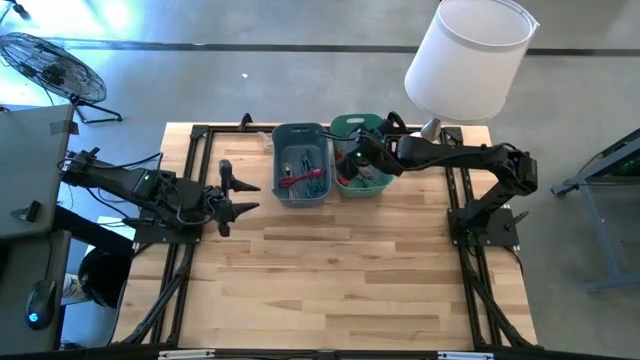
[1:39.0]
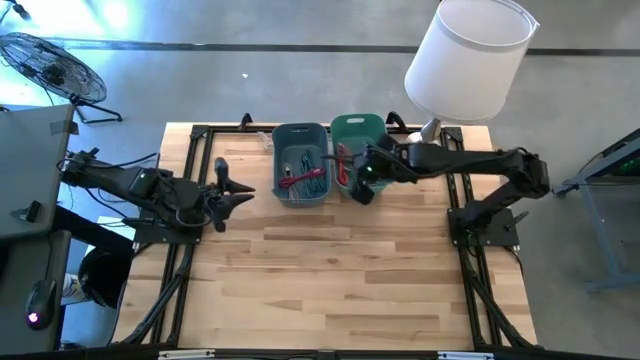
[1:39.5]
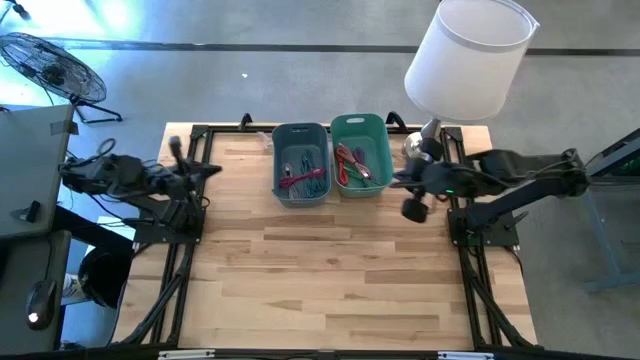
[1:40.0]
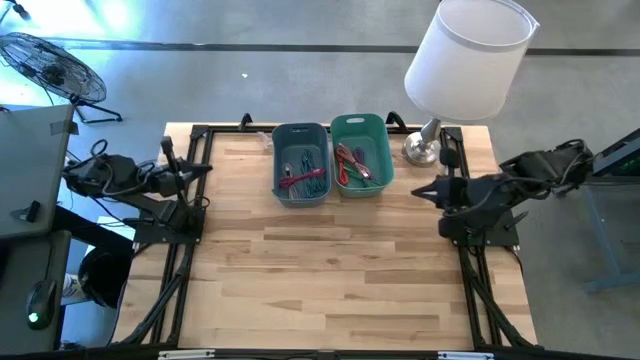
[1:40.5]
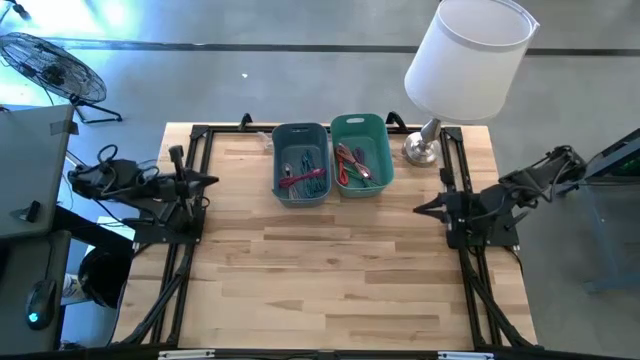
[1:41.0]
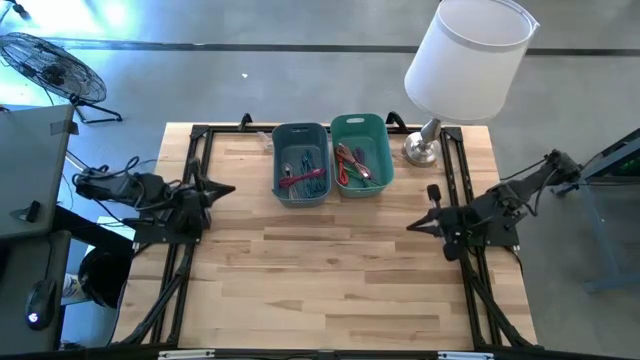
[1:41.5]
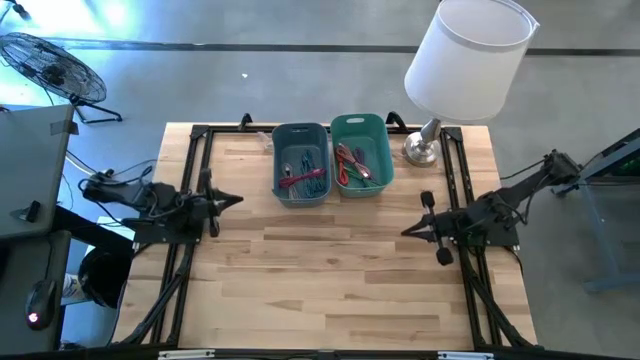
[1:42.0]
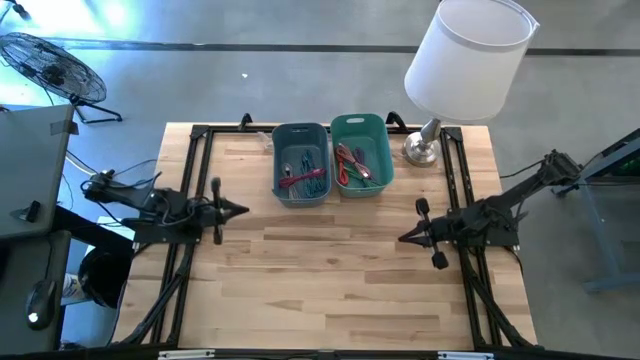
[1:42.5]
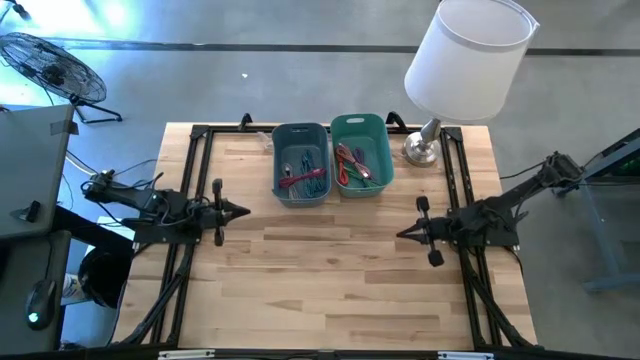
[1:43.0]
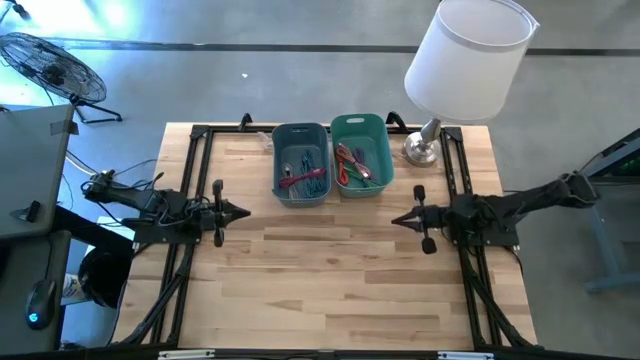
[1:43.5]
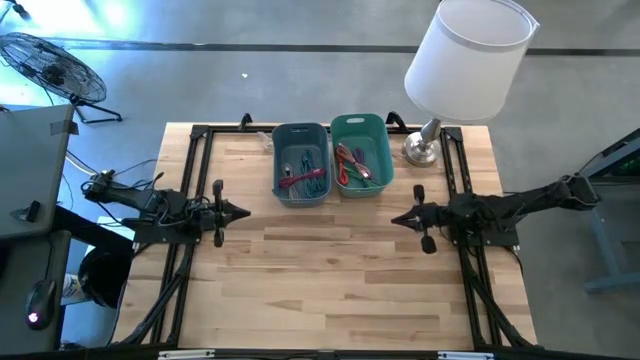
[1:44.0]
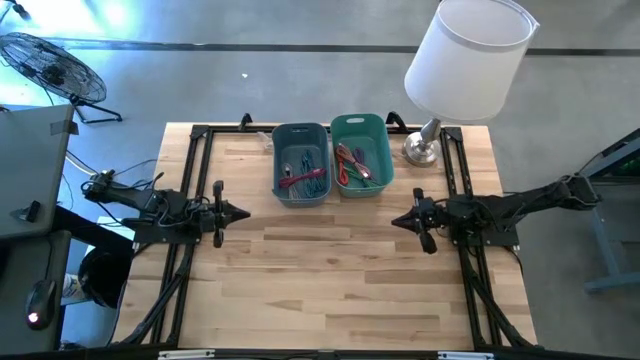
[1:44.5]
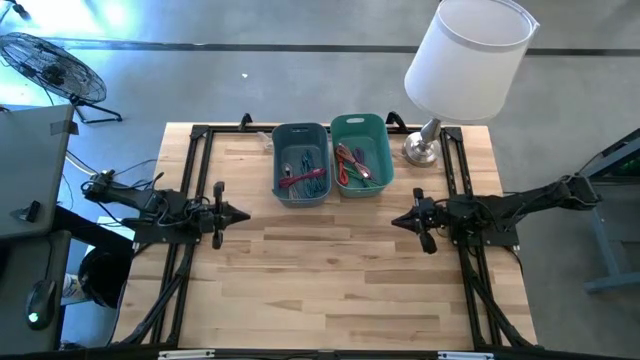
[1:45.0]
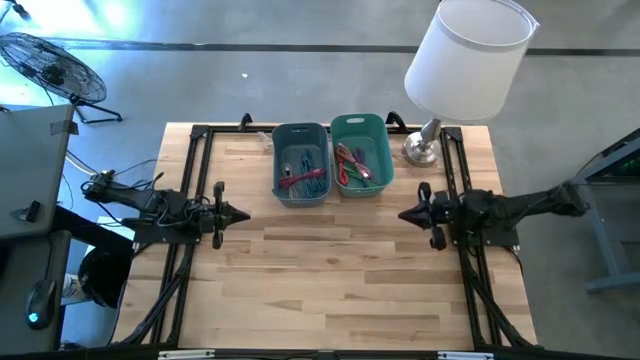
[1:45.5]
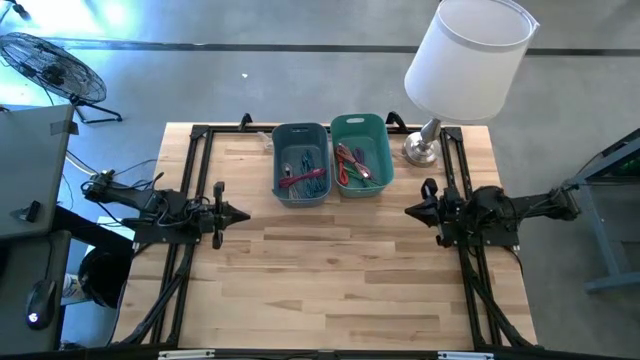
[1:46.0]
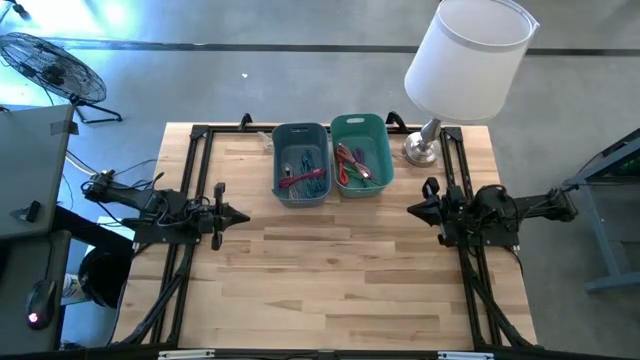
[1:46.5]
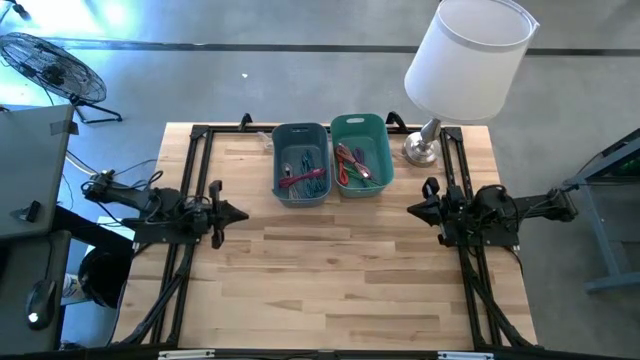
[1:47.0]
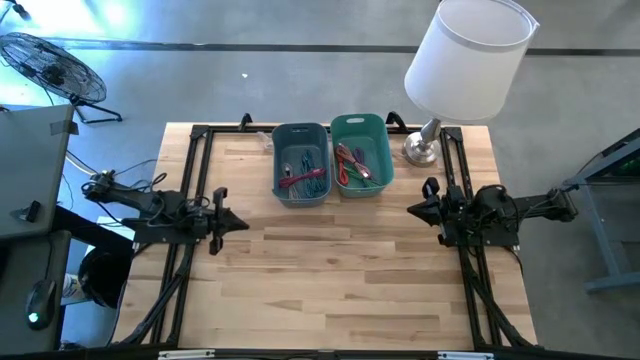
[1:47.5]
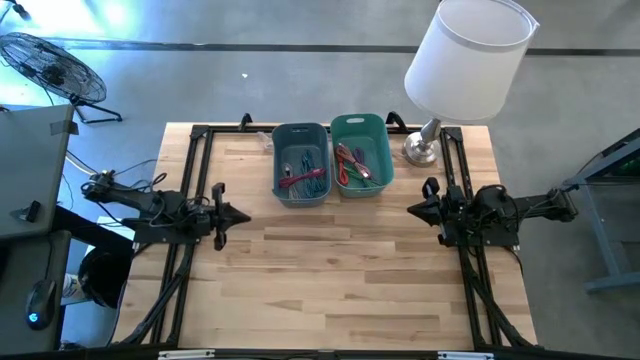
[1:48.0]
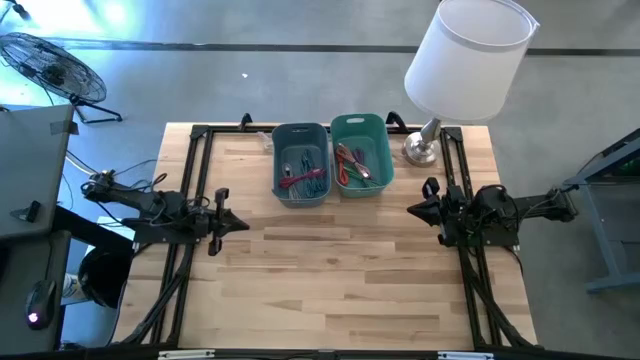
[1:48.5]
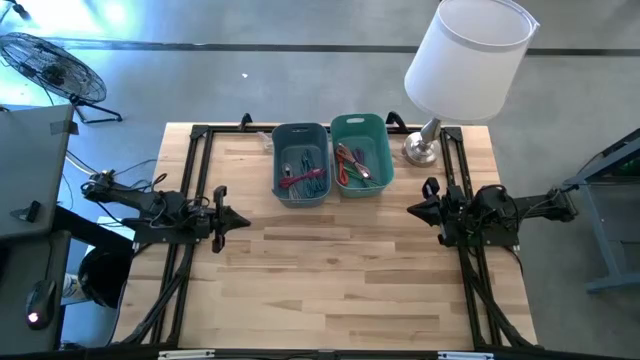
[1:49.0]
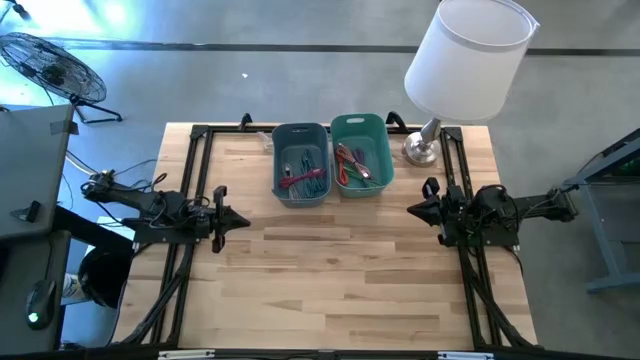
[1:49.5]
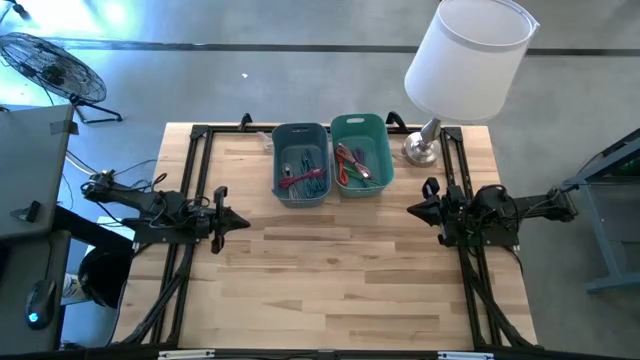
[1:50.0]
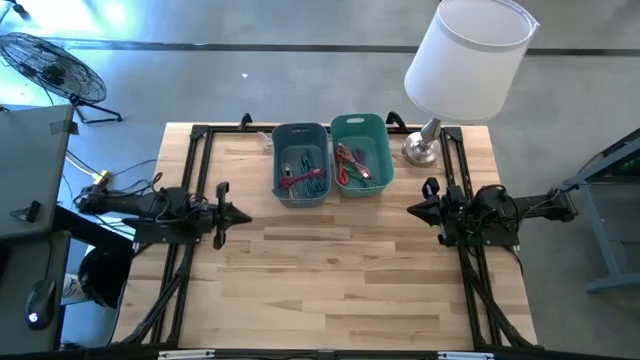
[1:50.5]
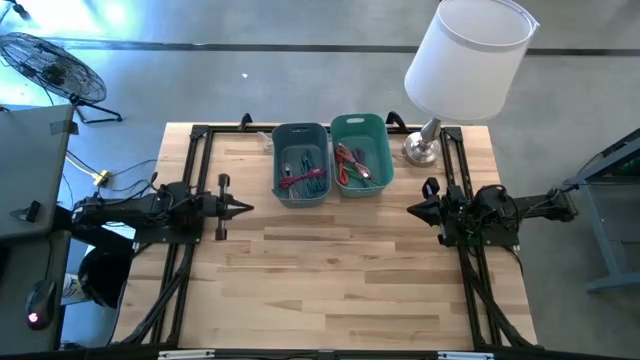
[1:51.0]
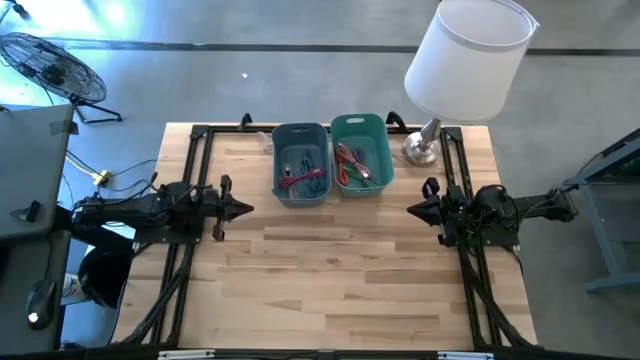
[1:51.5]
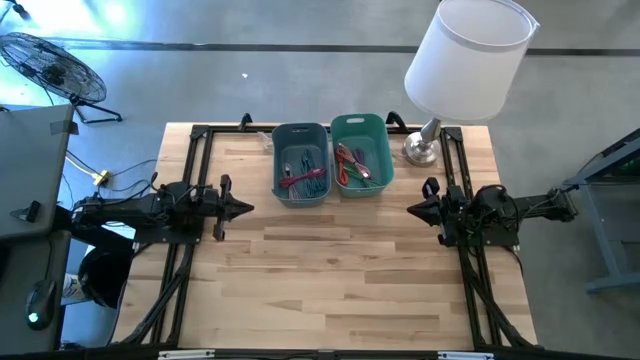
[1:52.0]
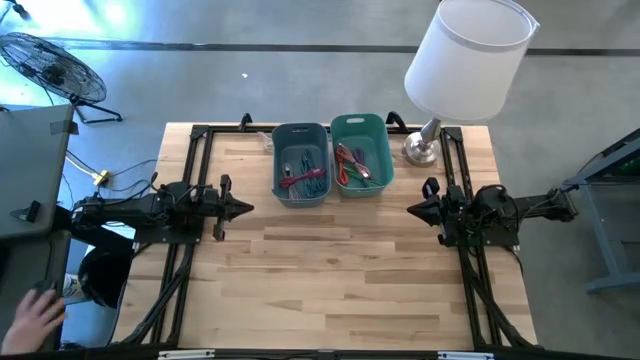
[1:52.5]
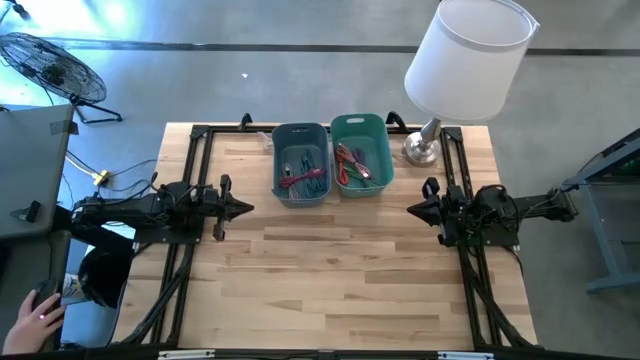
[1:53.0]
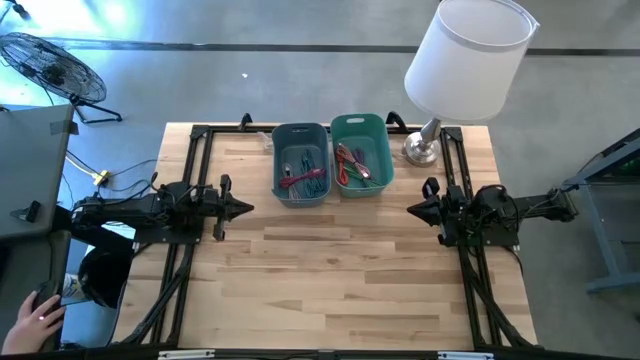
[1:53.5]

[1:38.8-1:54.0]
Task: Pick & Place USB Port
Return to Home Position

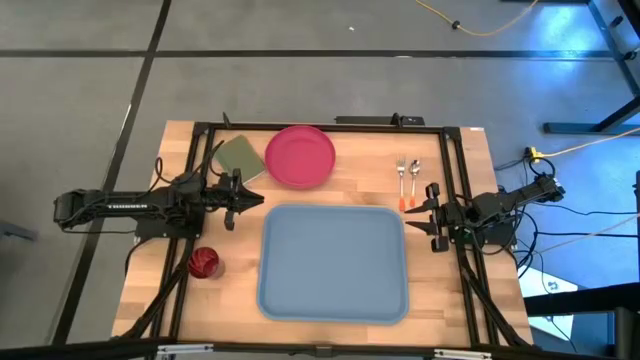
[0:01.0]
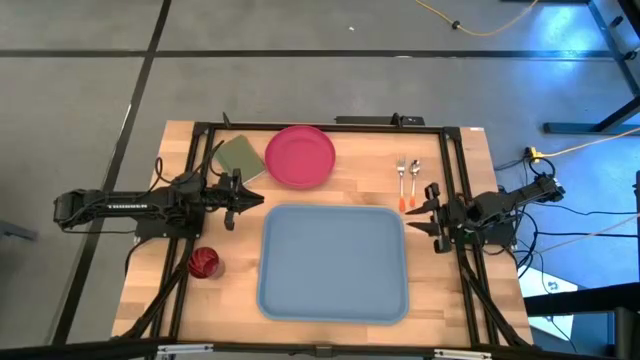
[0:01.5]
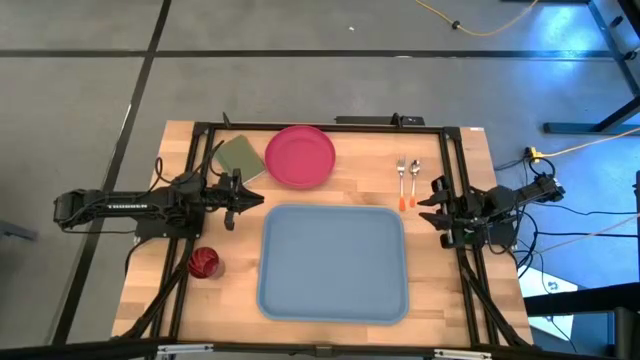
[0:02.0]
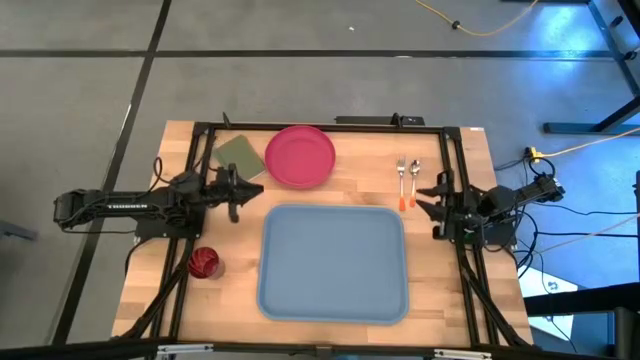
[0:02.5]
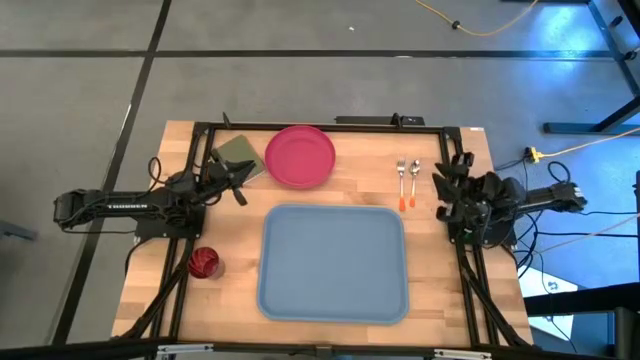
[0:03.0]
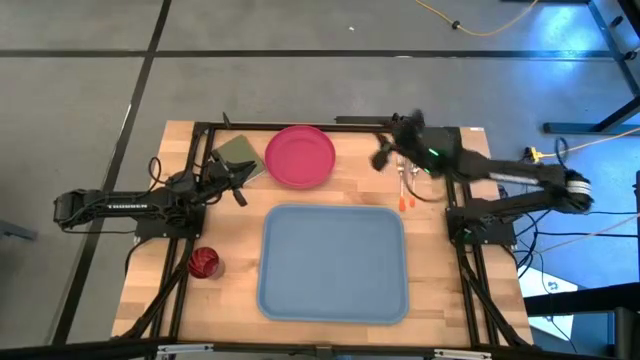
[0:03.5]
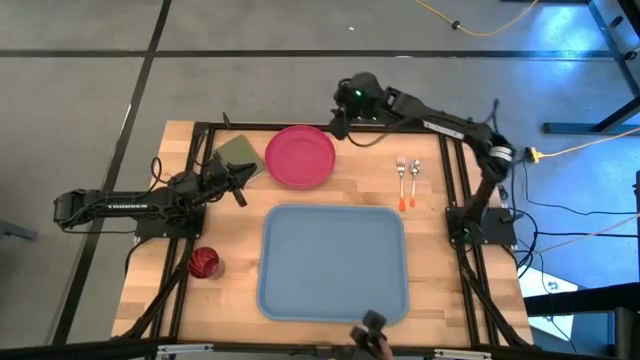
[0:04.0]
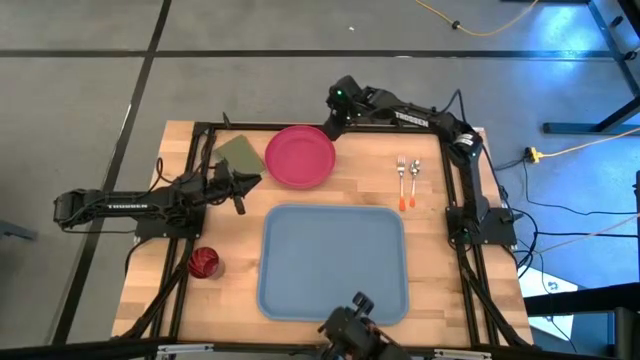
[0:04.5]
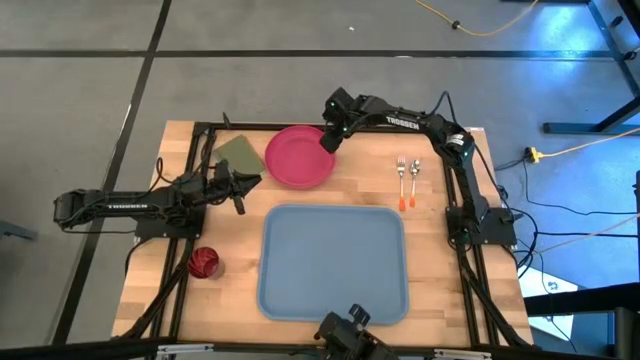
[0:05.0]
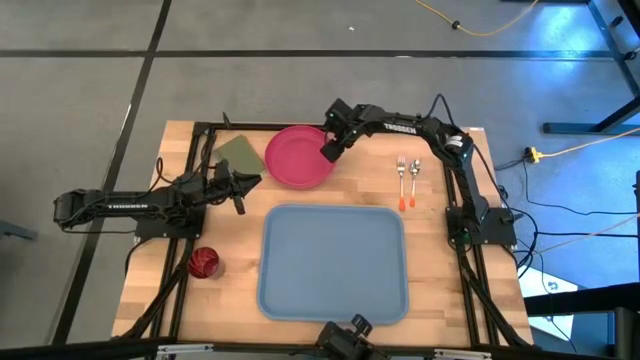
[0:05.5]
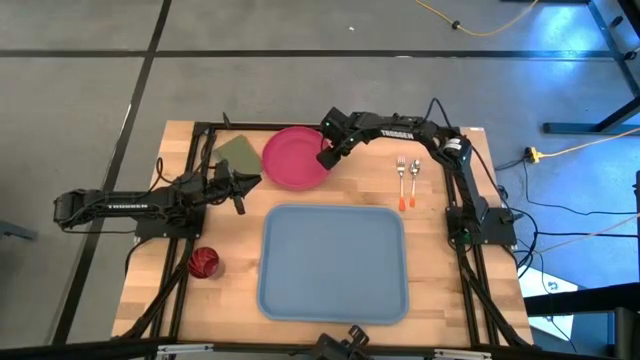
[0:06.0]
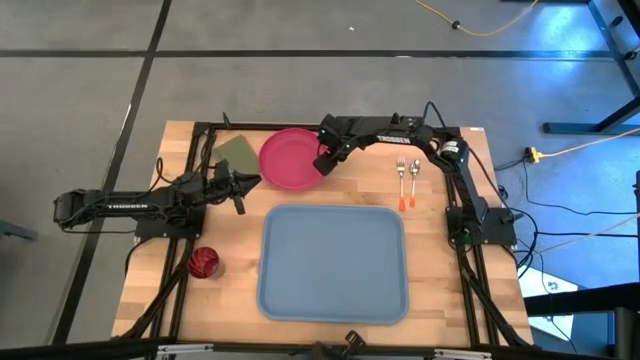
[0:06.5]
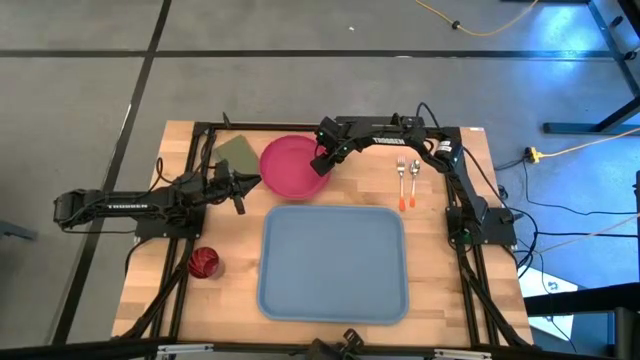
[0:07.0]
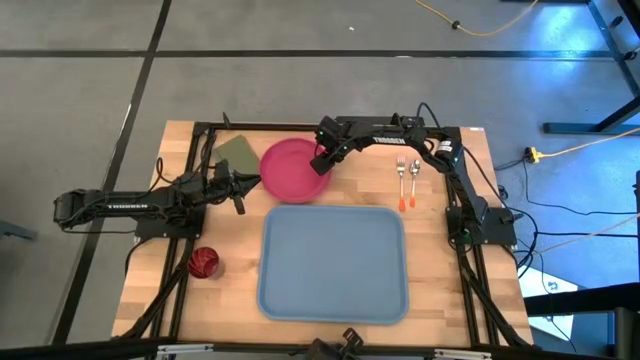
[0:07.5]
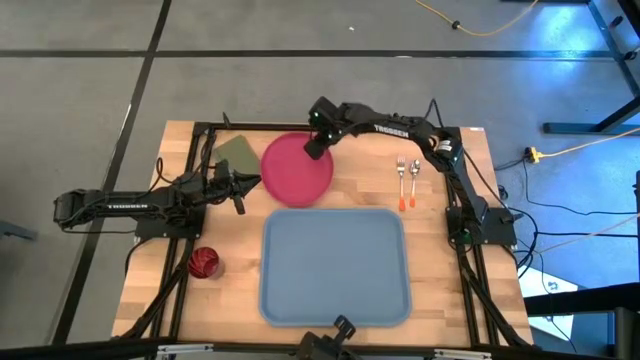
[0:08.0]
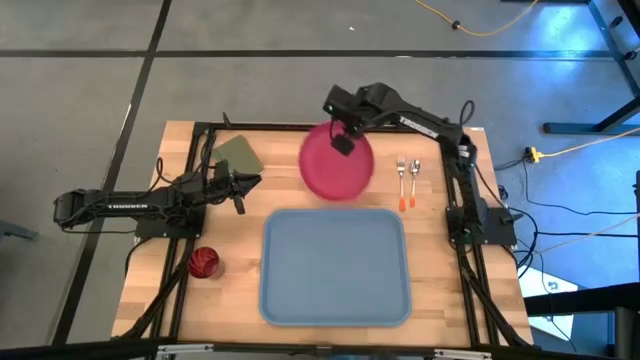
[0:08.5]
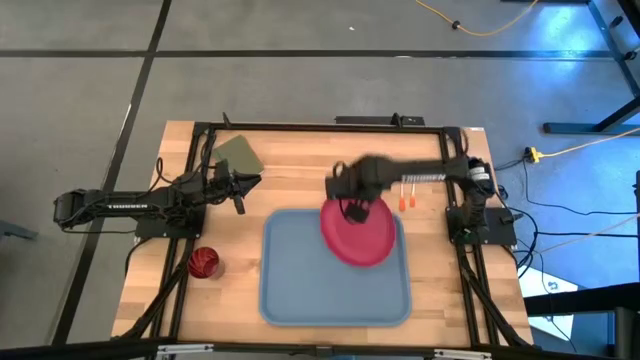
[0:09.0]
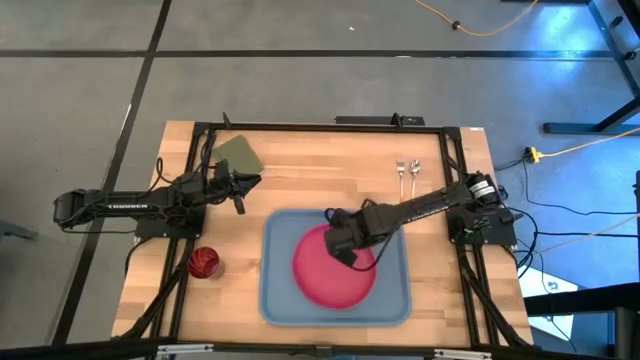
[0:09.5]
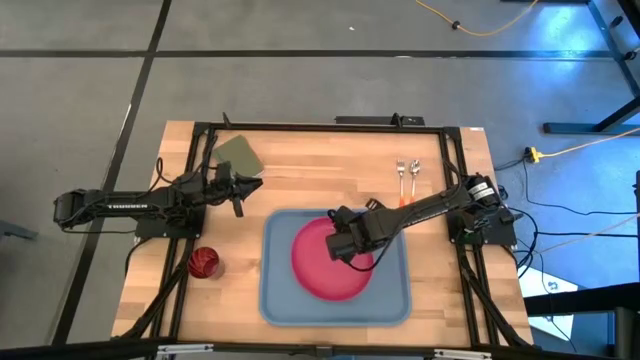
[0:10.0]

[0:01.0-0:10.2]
Task: Pick and place plate/cup/fork/spoon on tray
Put the pink plate on the blue serving tray
